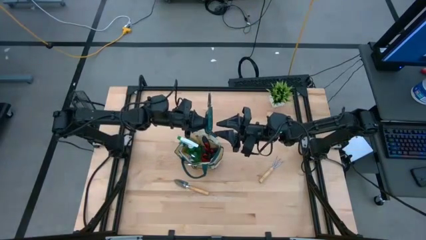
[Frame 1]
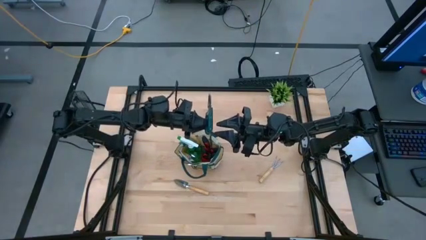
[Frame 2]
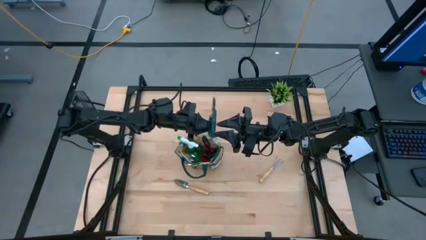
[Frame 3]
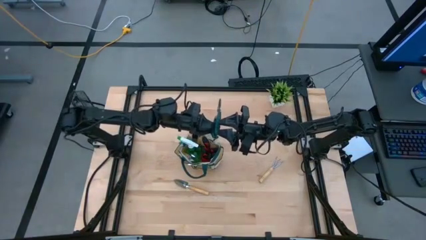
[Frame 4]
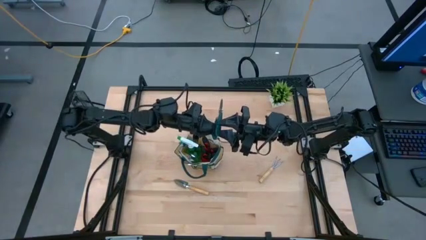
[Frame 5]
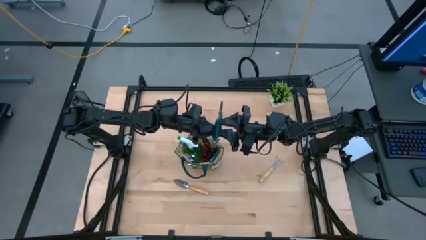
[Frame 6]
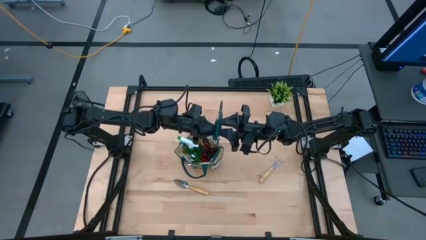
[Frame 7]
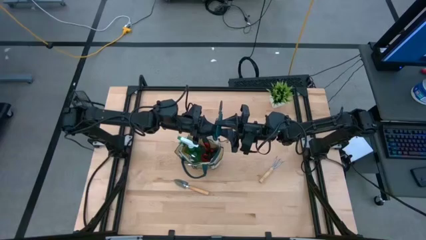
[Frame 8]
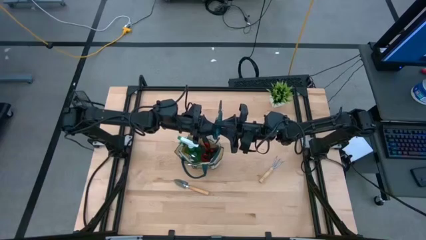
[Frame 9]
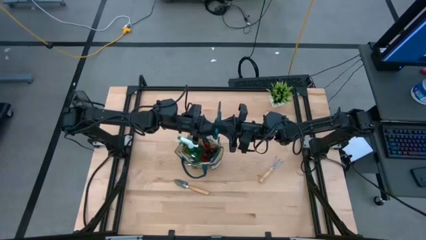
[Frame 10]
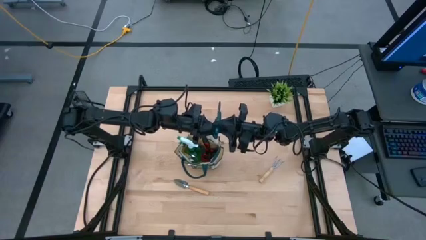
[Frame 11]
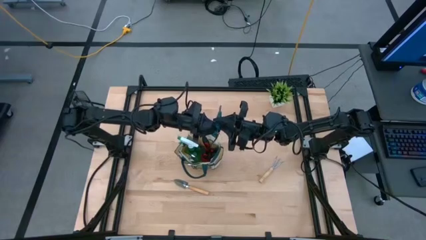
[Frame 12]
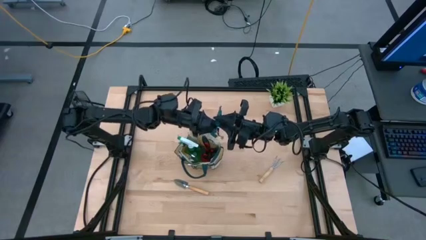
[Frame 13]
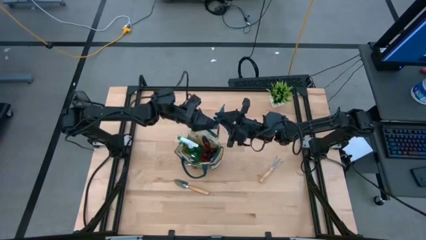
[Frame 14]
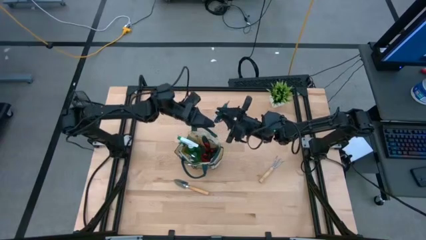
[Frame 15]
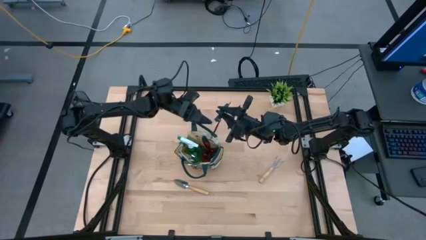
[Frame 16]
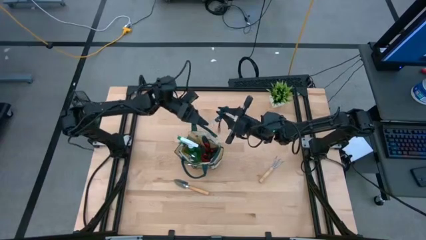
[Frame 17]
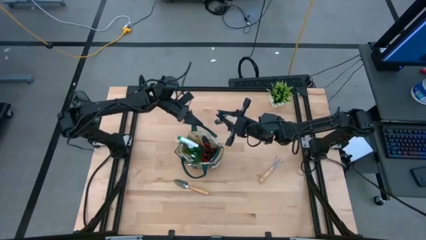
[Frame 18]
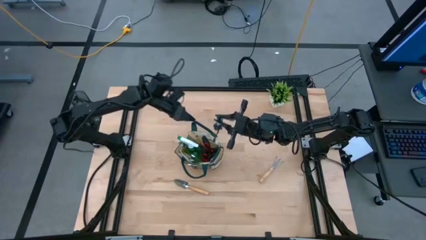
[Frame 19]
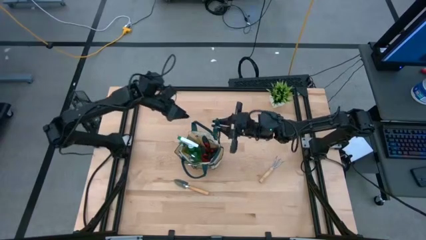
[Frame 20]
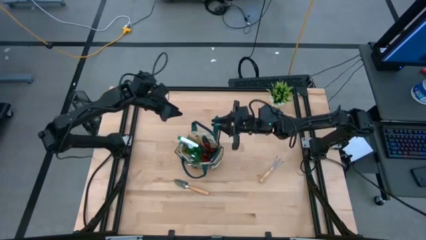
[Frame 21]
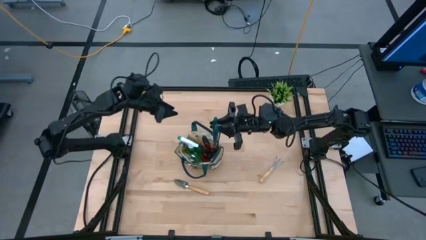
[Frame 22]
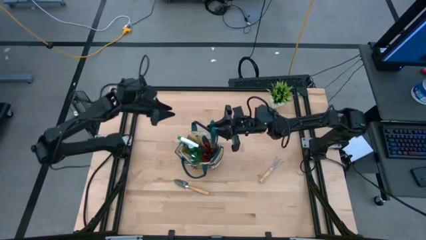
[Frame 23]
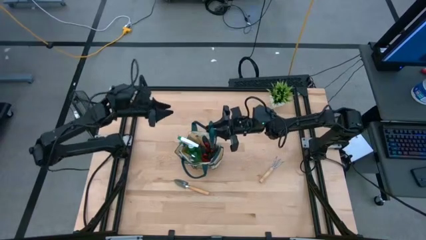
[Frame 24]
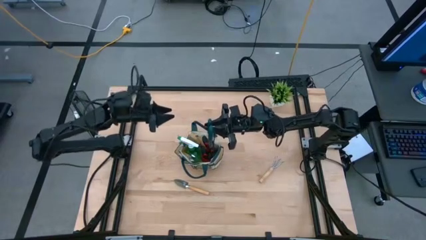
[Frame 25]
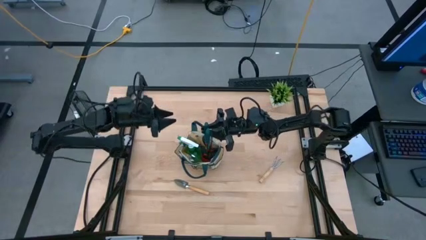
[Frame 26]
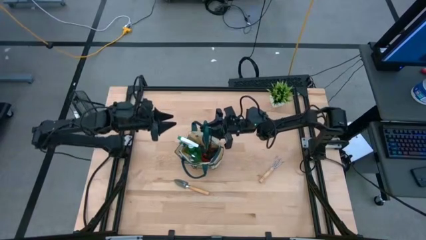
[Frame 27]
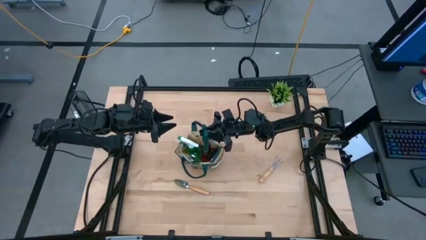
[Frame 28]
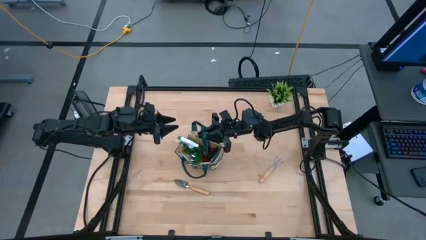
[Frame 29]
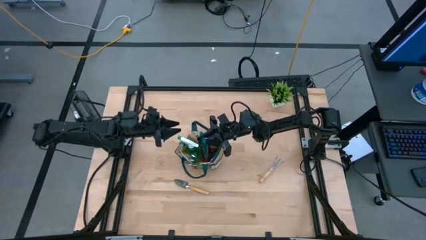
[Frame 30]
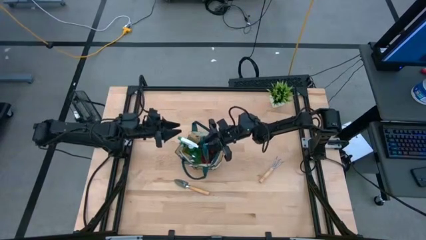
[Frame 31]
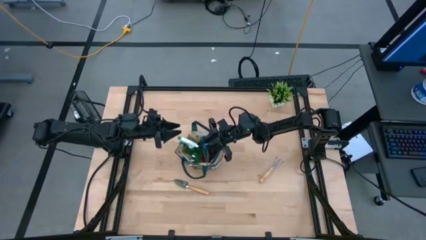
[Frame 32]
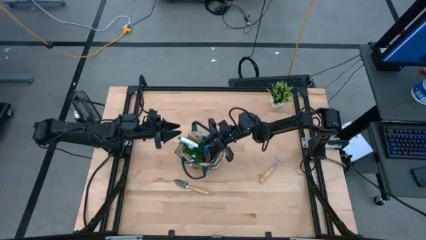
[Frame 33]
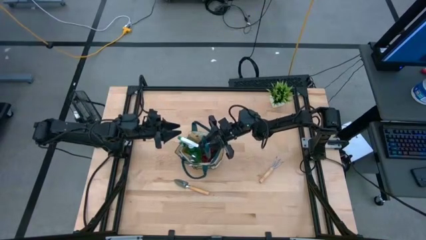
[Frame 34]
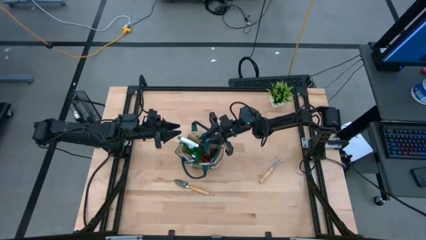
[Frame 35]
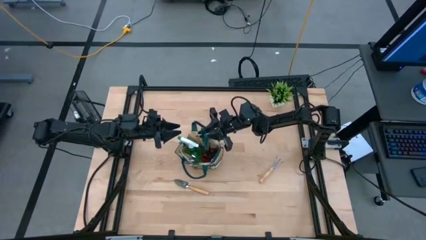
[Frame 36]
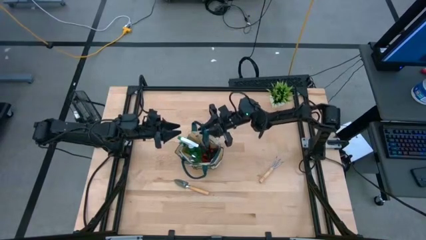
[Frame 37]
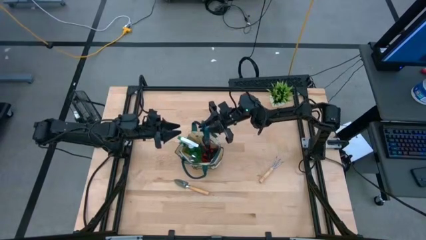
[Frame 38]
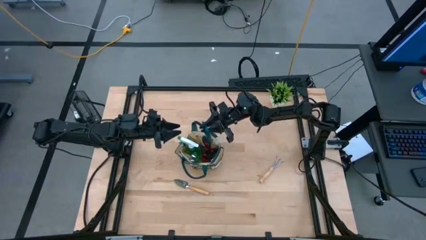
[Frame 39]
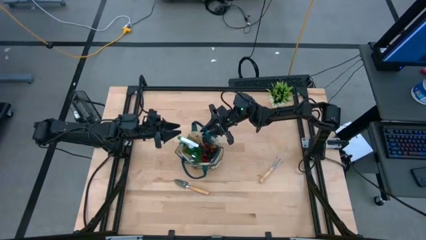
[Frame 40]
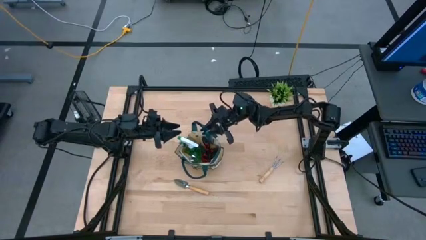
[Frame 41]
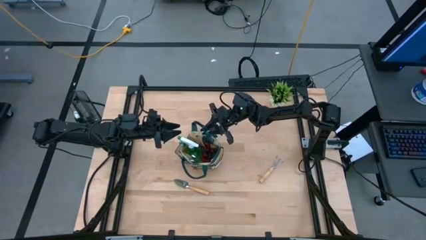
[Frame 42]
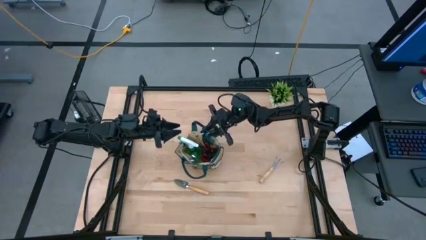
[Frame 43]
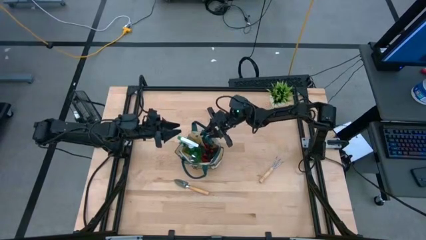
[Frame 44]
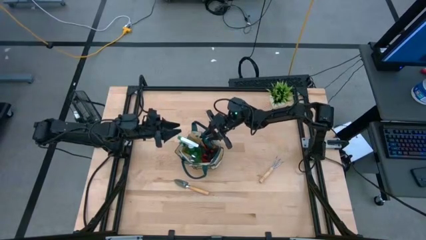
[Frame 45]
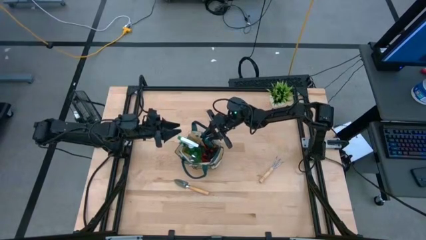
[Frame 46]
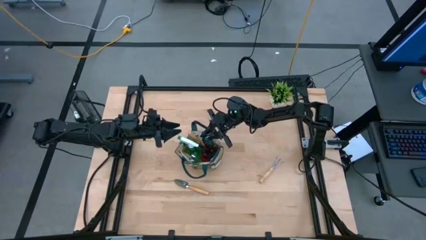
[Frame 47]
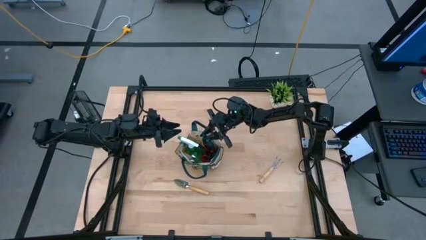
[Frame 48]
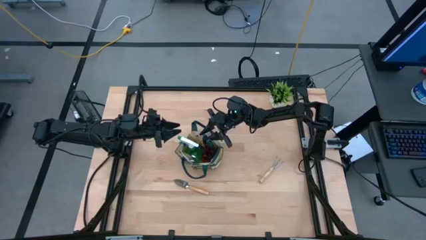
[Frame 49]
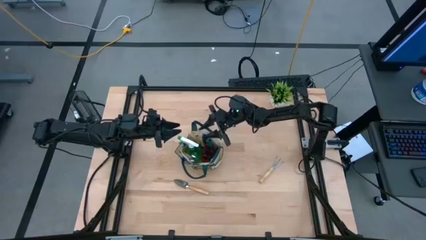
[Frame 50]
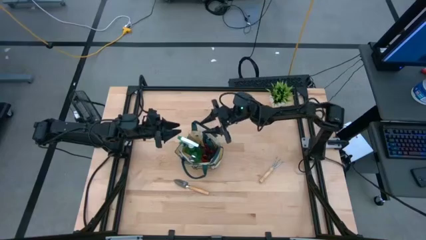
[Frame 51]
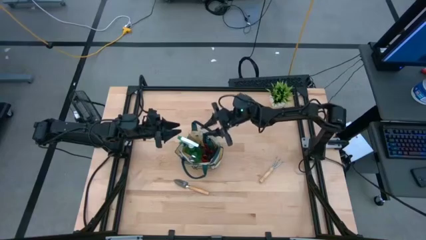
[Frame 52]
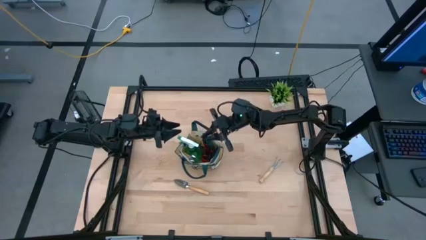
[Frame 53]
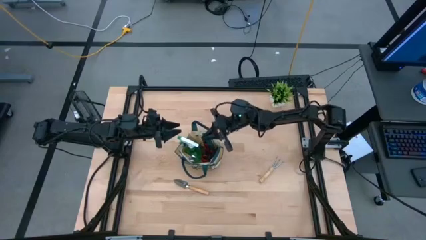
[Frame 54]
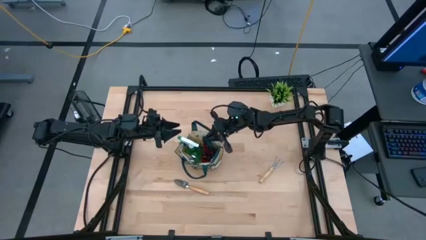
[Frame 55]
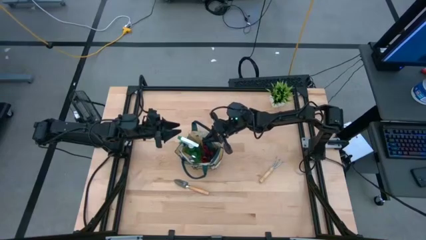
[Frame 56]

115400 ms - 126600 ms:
Task: Pick & Place Garden tools in Gardening bag
Put the green shear scissors into the gardening bag
